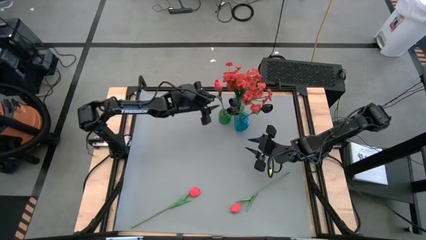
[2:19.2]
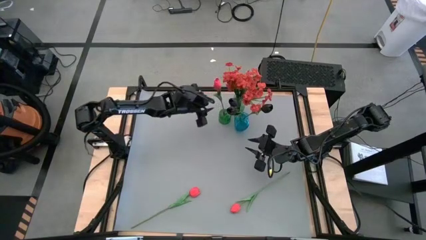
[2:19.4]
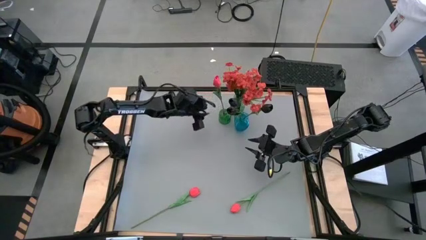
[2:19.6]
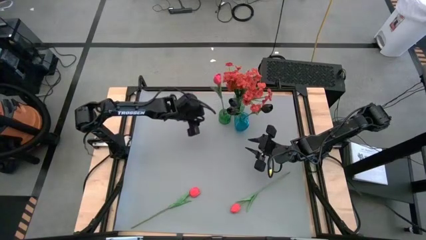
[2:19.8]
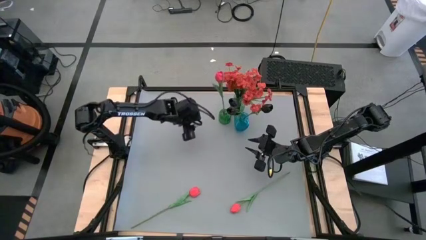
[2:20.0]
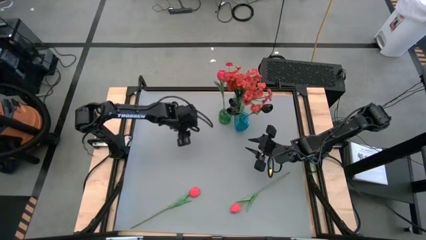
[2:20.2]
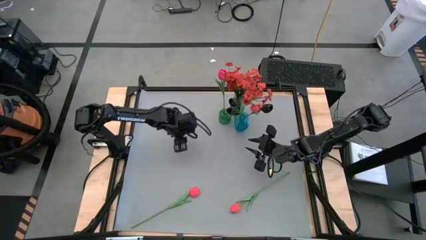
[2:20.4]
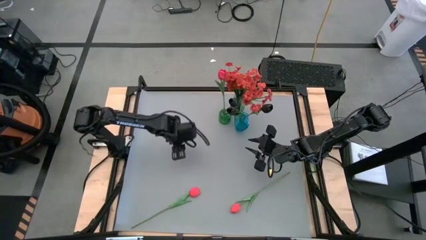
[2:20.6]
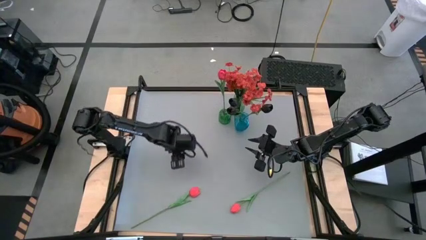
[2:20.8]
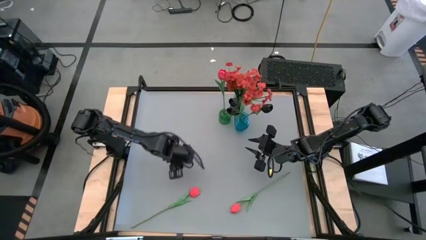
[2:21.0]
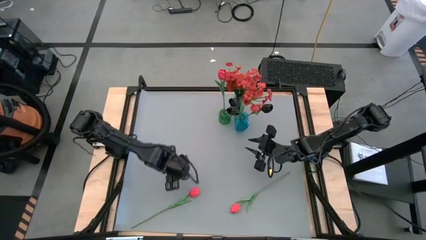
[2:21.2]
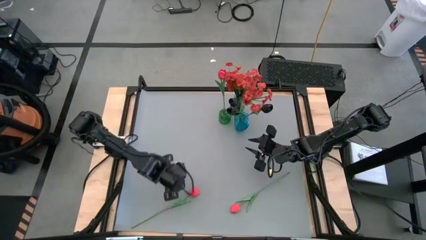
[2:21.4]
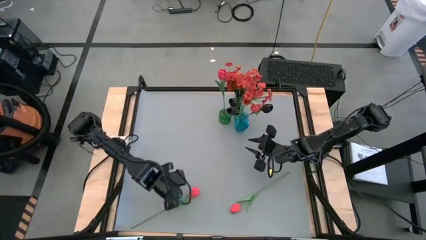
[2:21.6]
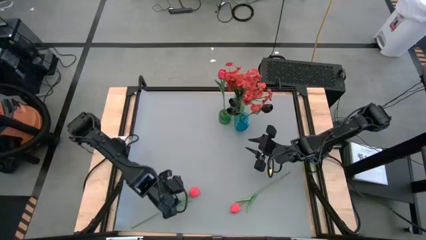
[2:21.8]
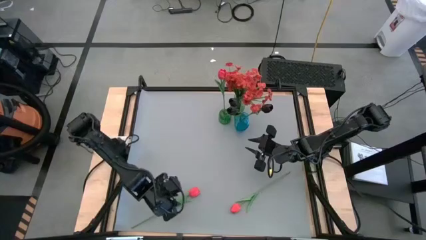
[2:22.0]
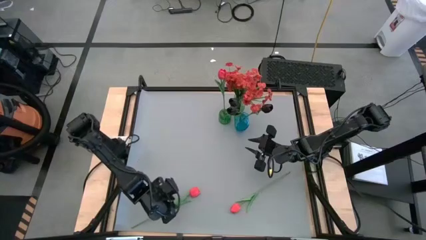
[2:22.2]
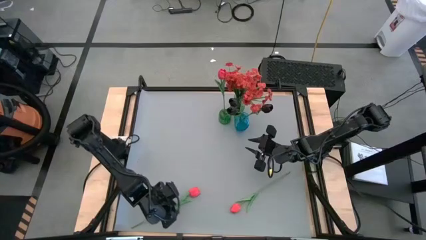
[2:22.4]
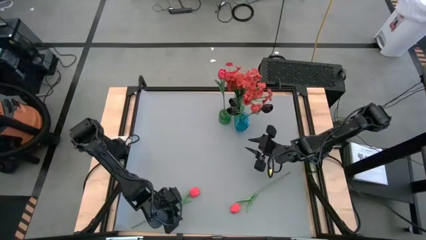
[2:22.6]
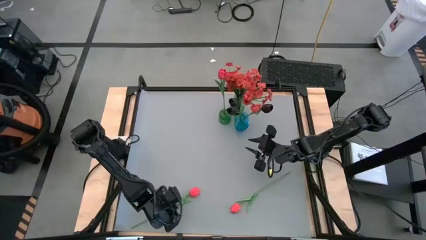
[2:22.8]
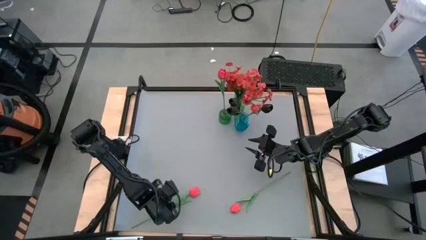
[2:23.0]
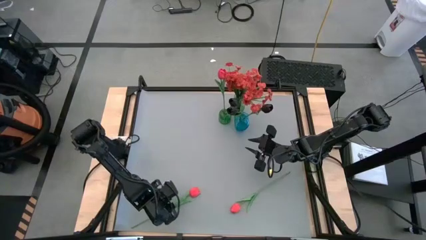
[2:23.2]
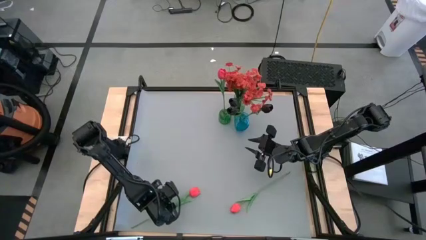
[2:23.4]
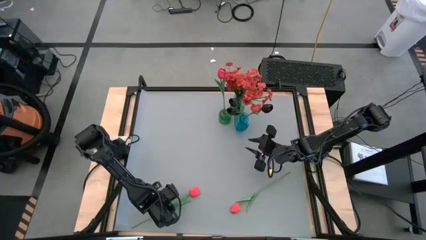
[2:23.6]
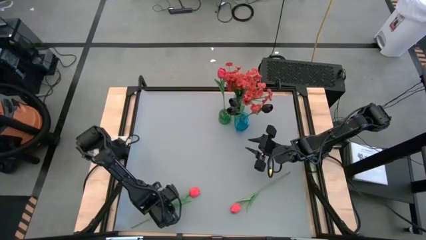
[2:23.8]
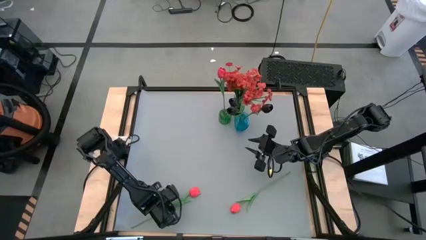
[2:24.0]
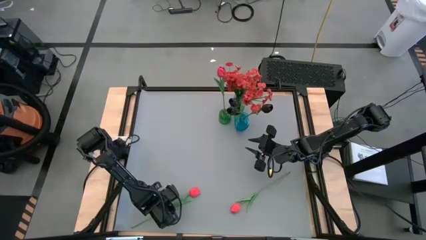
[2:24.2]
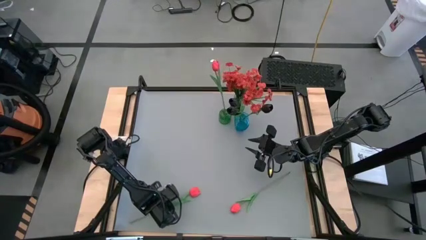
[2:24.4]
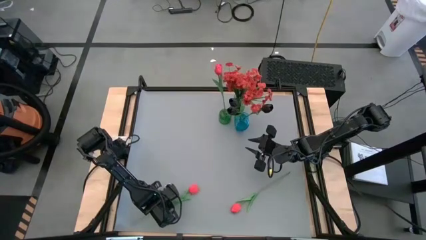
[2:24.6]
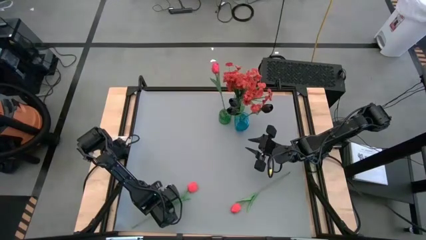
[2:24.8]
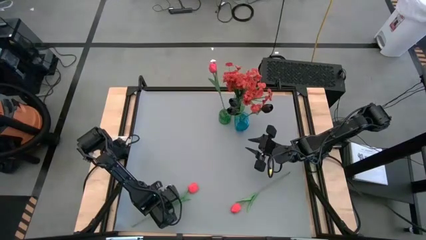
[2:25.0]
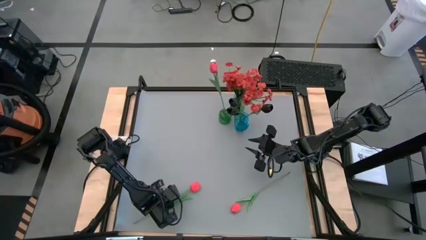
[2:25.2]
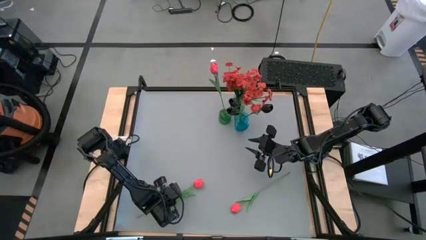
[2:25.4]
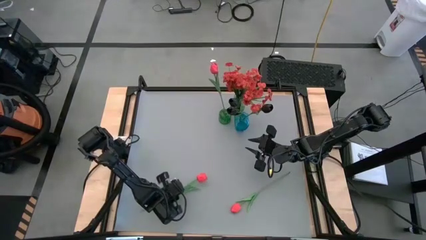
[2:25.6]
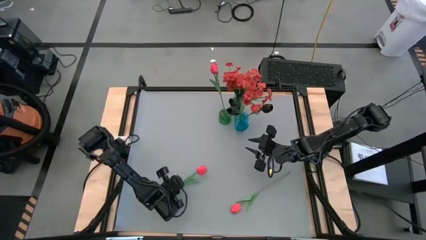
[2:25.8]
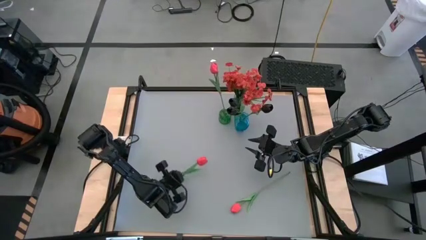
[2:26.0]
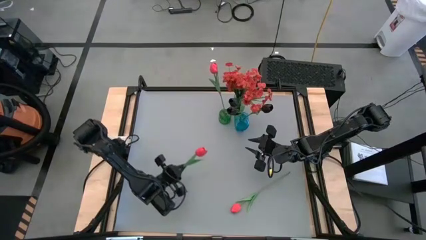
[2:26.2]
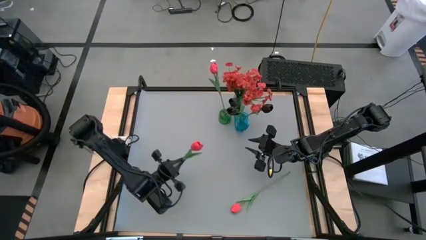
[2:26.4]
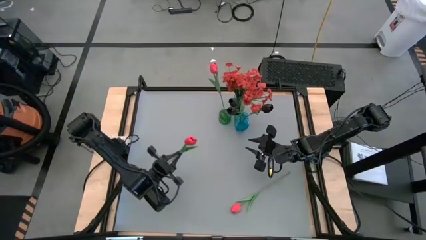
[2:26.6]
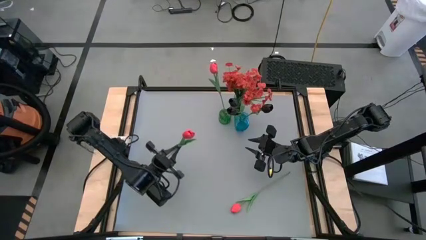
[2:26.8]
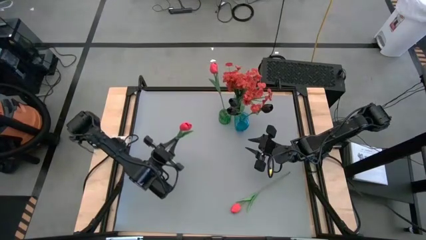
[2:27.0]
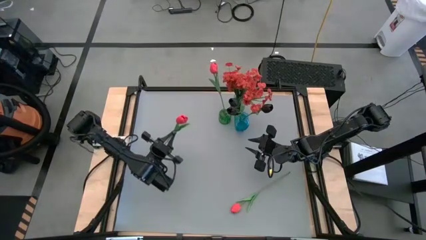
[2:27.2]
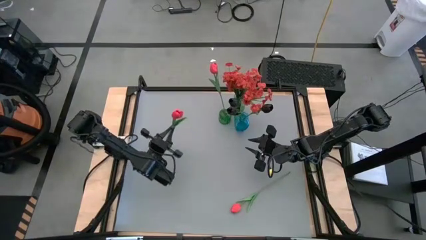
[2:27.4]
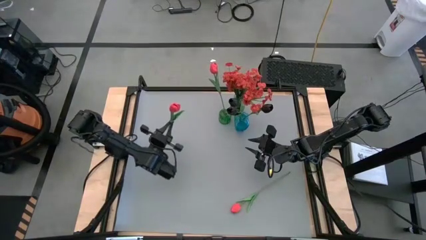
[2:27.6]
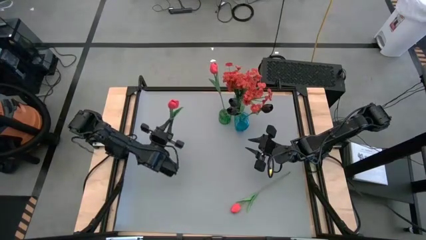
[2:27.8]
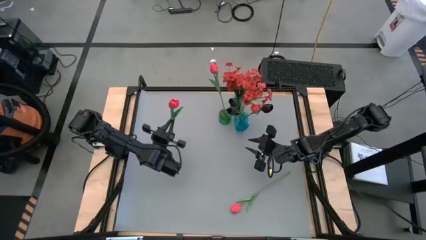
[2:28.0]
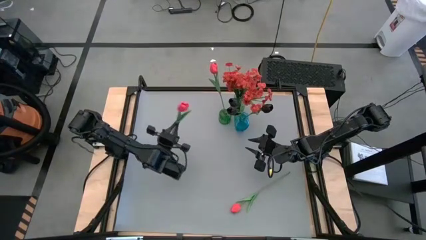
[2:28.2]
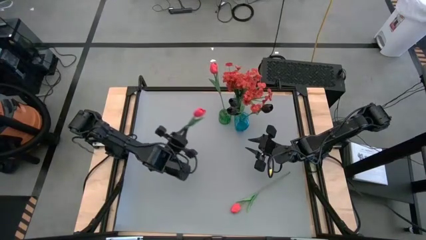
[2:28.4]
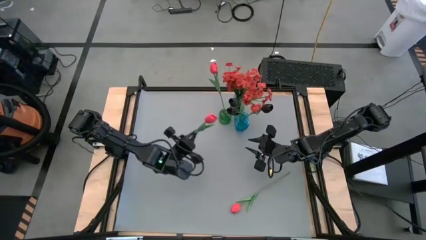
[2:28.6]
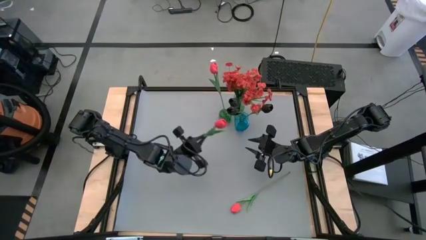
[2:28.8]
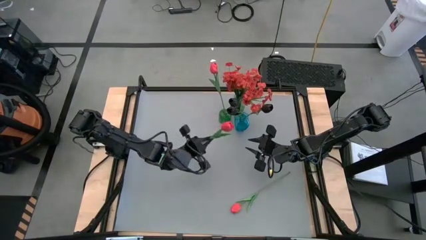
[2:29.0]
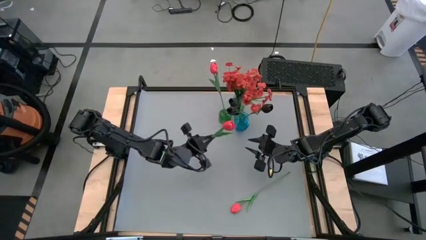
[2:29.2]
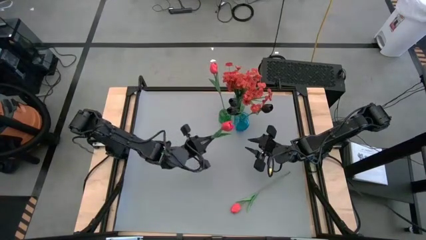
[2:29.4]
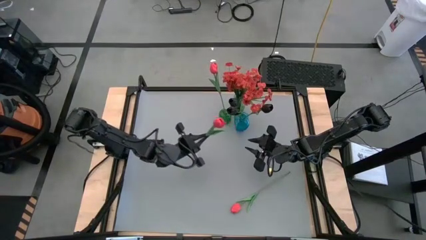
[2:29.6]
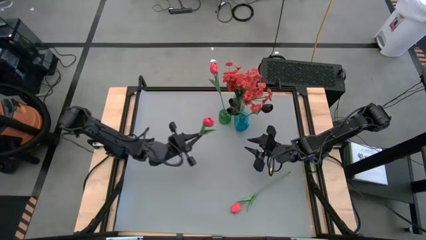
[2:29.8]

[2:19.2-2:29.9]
Task: Sort flowers into vase by color
Put the left pink flower into the bottom green vase

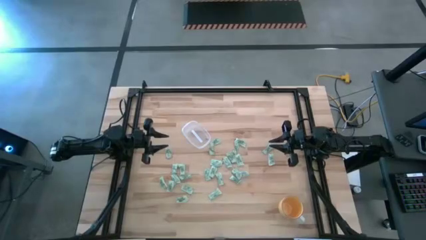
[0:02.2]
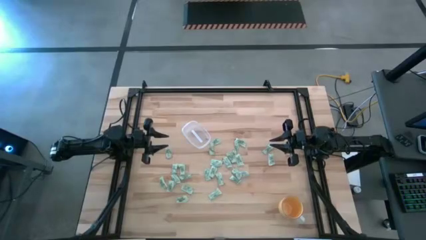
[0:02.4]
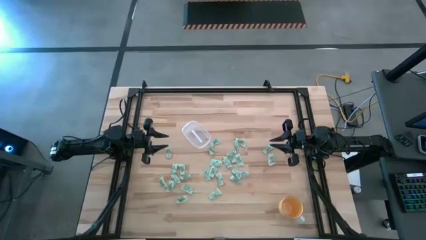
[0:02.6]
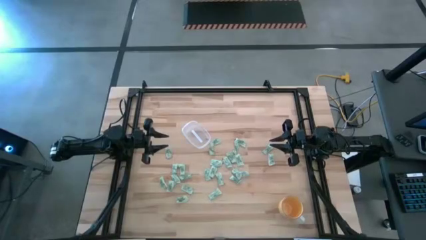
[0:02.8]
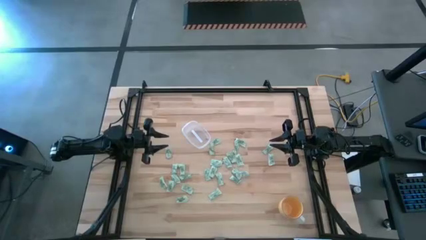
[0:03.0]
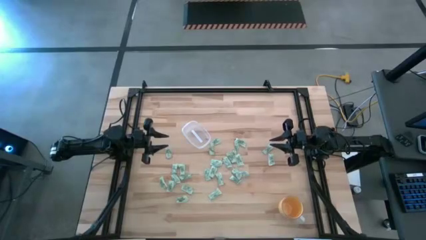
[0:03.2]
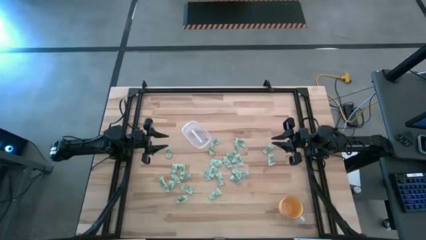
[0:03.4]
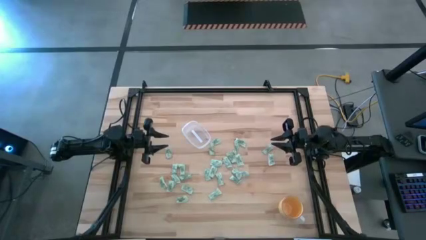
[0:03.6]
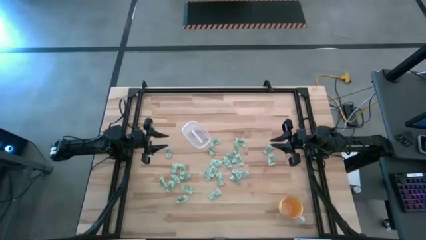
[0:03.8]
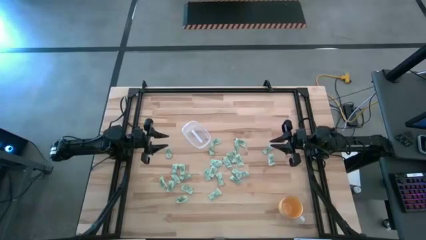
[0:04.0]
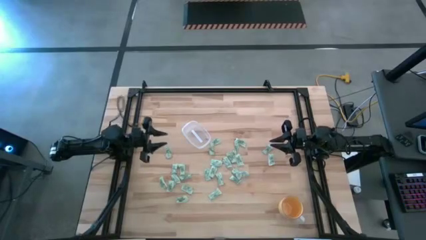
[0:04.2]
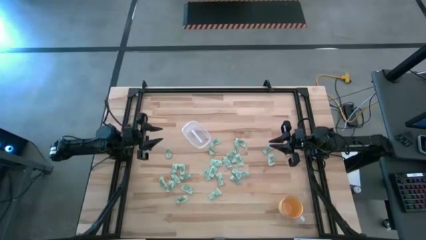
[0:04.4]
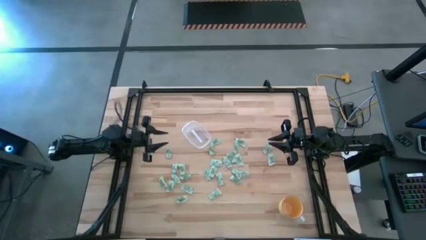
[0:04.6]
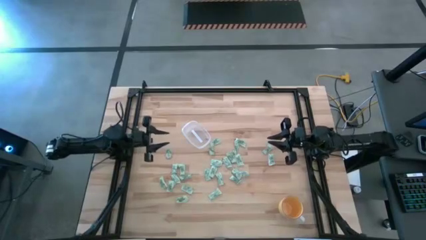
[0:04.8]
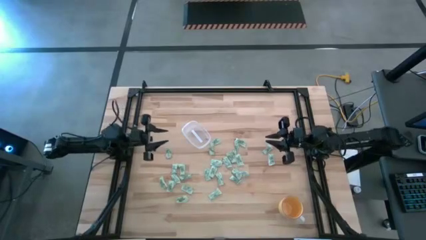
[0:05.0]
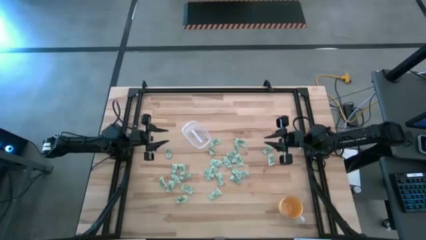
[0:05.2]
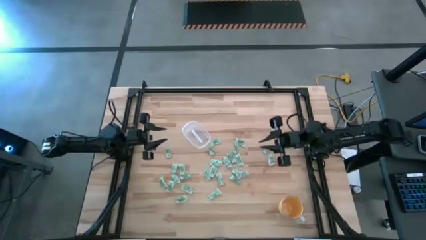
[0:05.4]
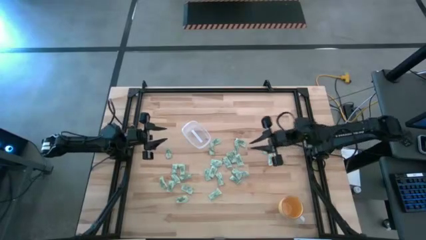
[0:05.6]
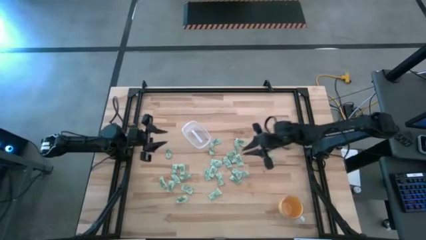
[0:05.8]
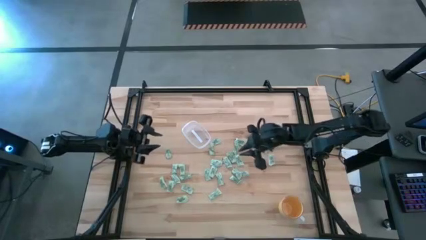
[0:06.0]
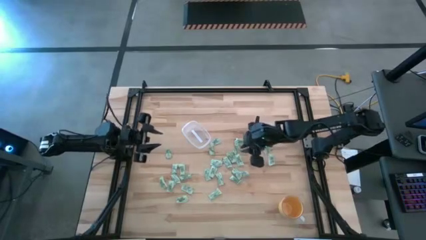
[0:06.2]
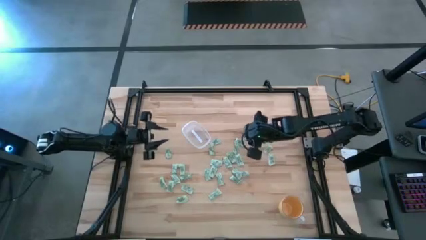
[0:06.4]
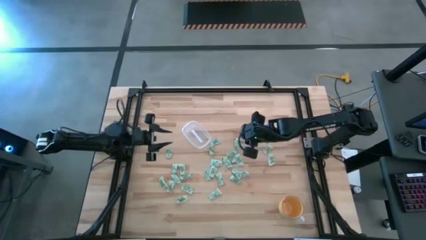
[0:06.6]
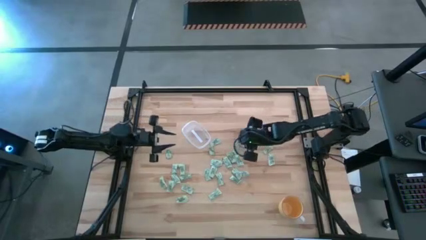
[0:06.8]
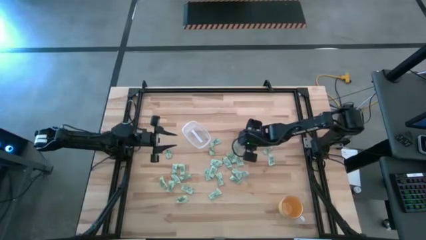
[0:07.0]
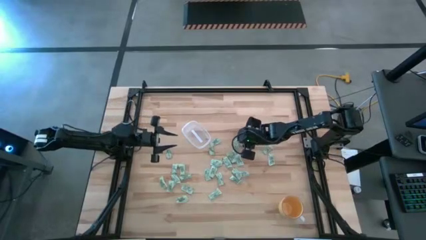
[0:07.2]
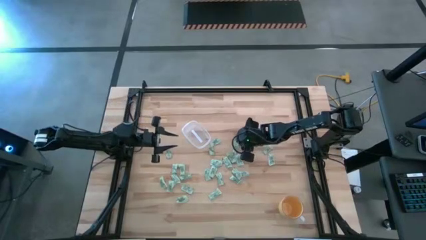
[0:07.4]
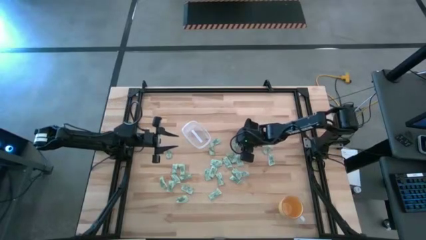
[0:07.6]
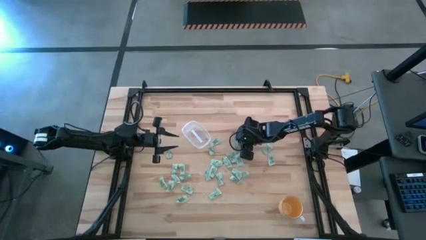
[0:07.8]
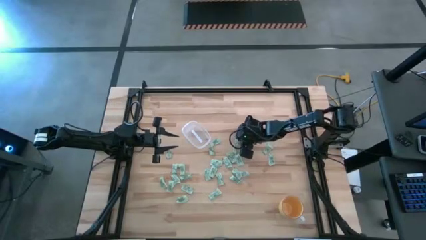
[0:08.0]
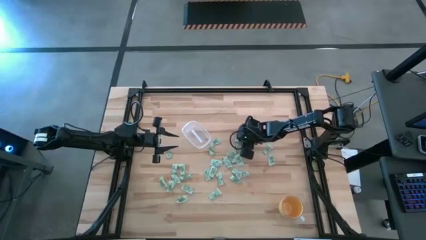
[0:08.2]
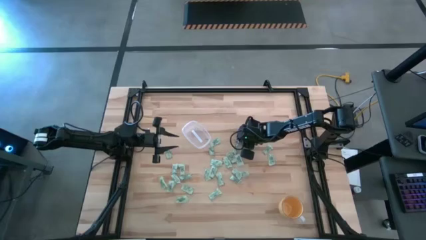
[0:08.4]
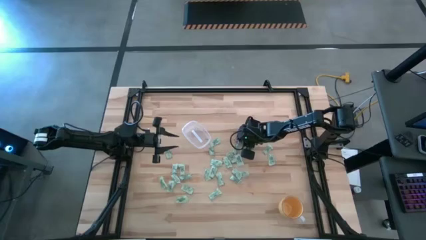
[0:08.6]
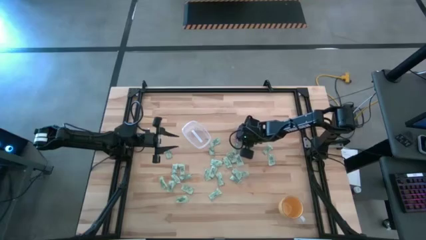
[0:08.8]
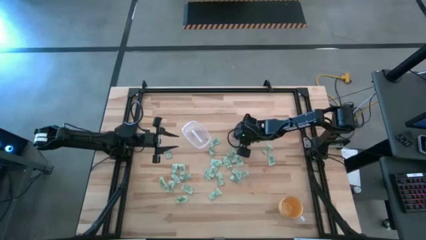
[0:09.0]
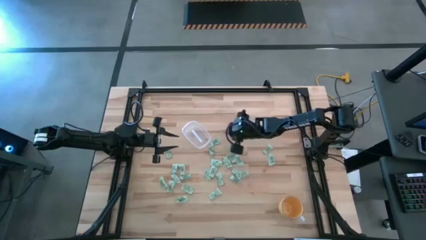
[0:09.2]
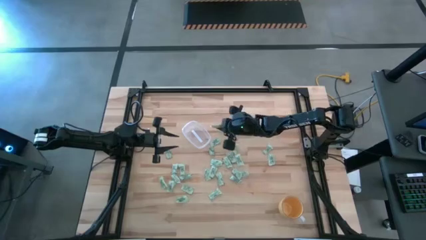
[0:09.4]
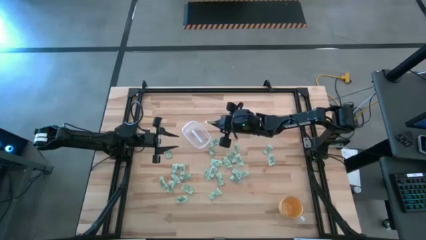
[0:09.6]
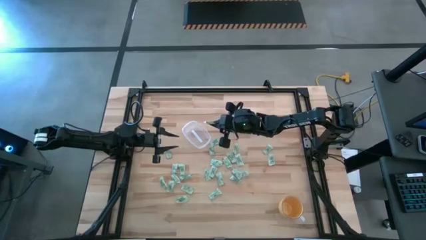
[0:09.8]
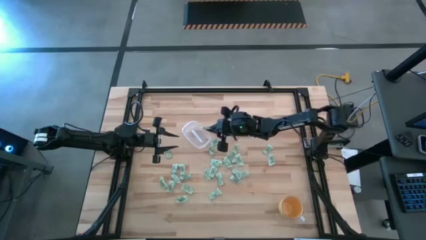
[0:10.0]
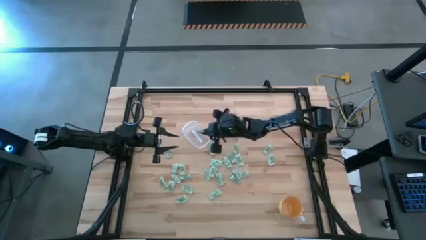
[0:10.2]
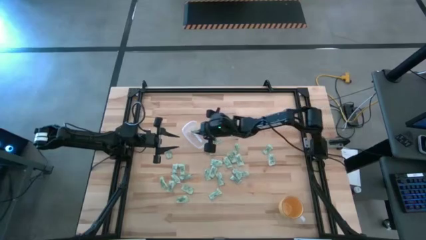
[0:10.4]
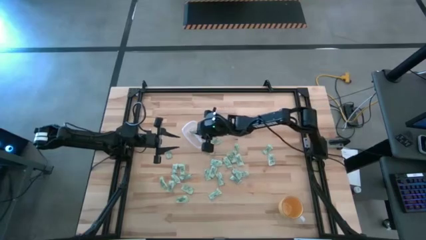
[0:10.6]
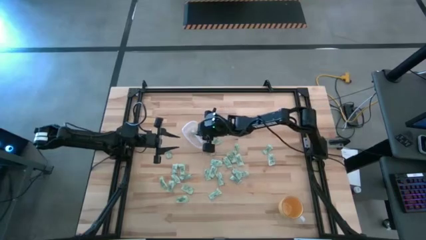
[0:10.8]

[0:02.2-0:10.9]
Task: Pick and place Stevia / Truvia into bins
Put the stevia packet into the transparent bin
